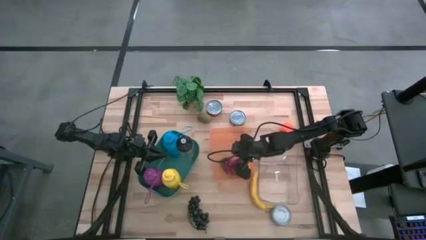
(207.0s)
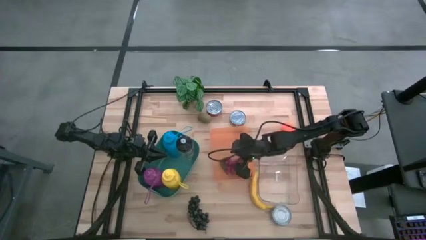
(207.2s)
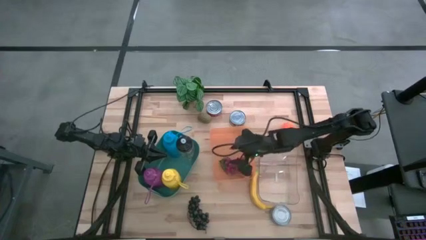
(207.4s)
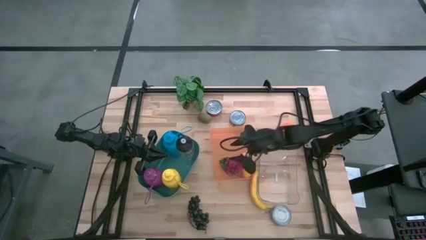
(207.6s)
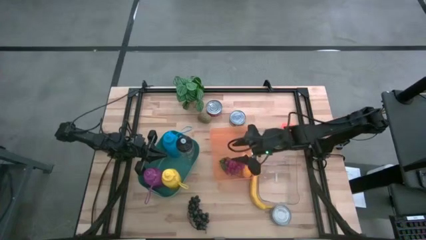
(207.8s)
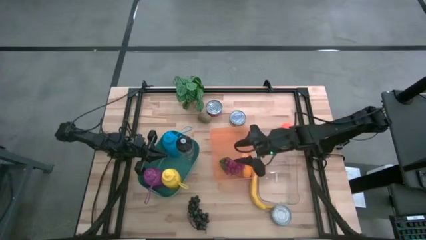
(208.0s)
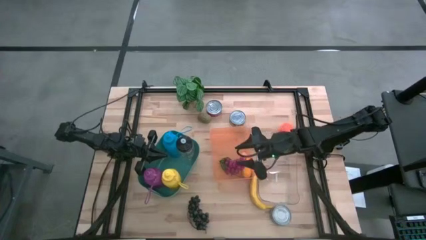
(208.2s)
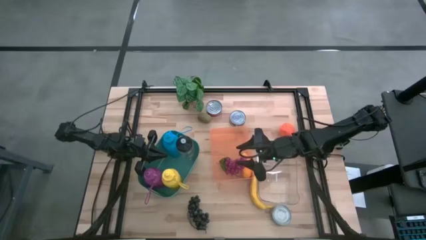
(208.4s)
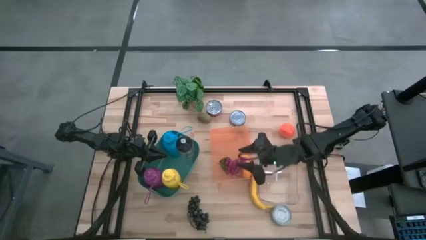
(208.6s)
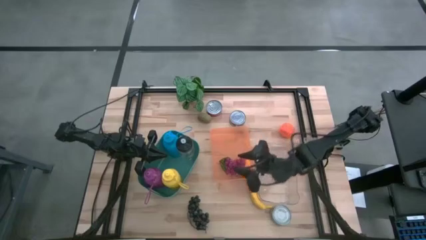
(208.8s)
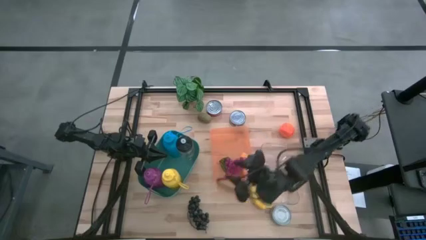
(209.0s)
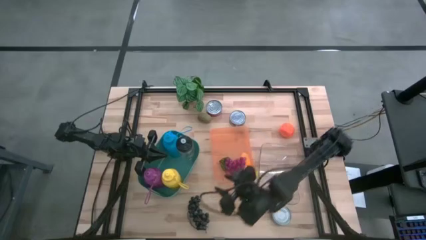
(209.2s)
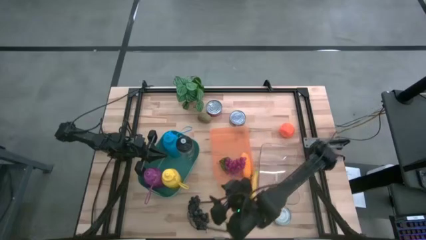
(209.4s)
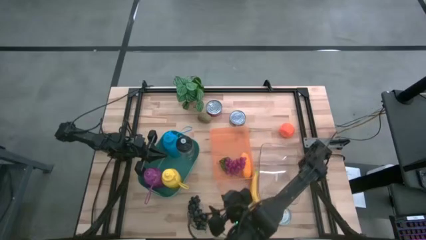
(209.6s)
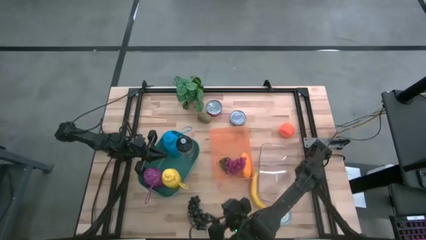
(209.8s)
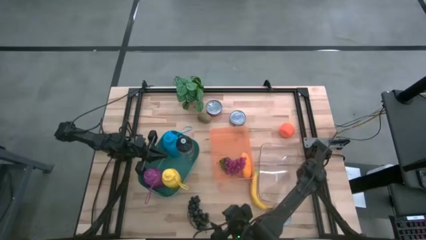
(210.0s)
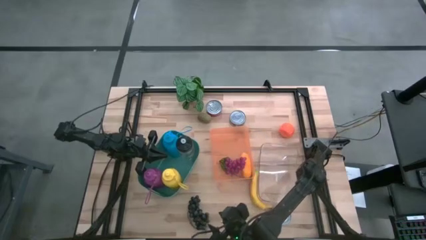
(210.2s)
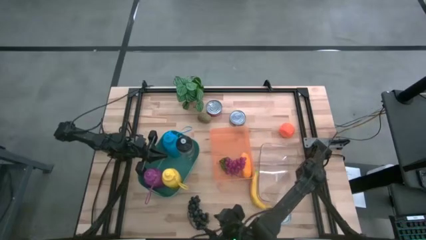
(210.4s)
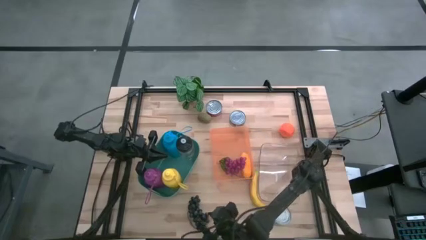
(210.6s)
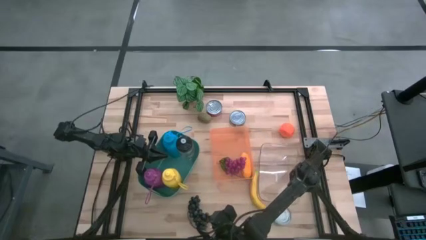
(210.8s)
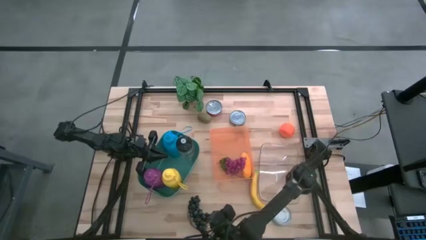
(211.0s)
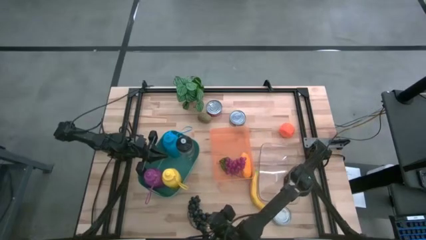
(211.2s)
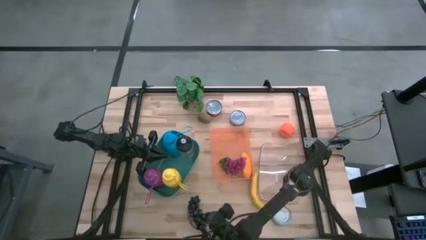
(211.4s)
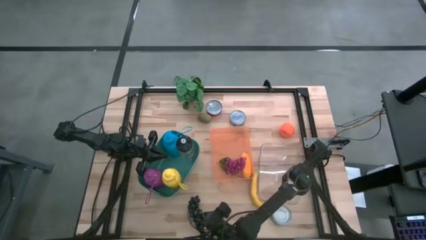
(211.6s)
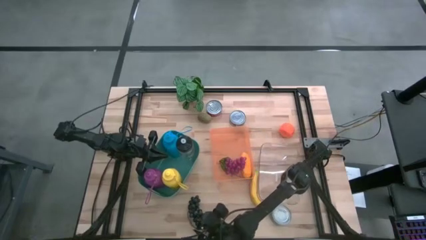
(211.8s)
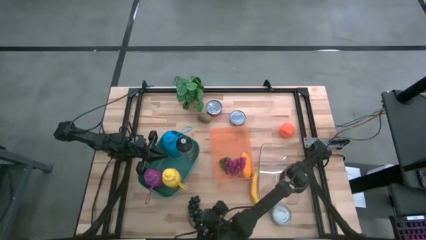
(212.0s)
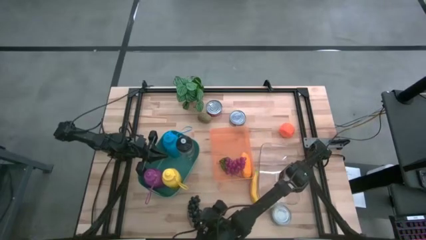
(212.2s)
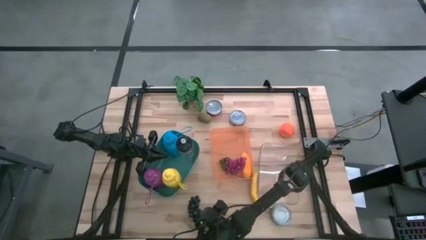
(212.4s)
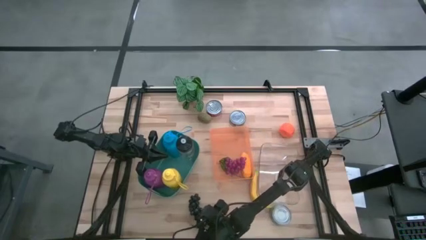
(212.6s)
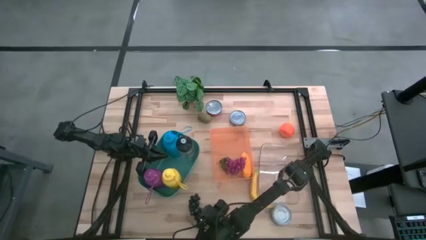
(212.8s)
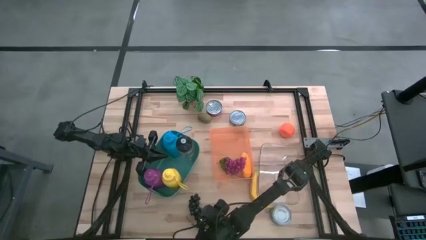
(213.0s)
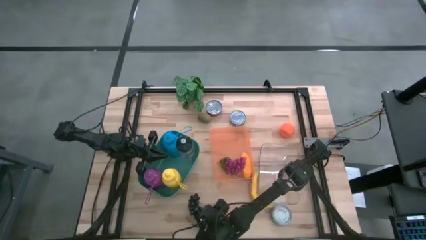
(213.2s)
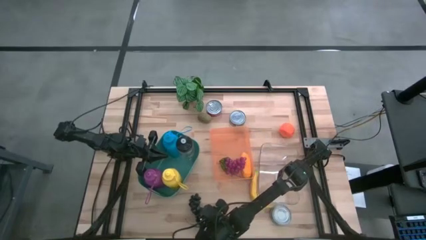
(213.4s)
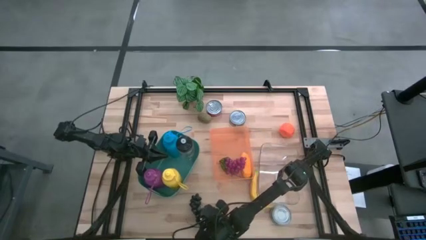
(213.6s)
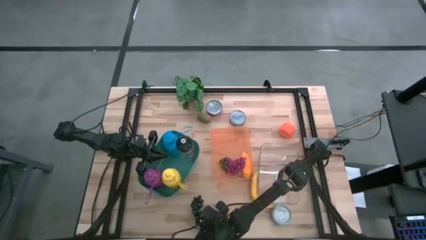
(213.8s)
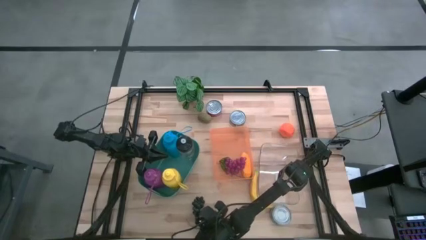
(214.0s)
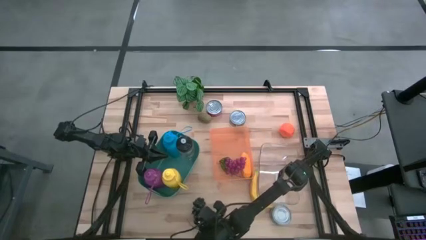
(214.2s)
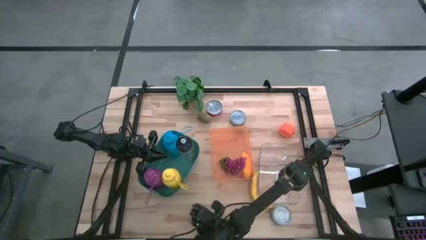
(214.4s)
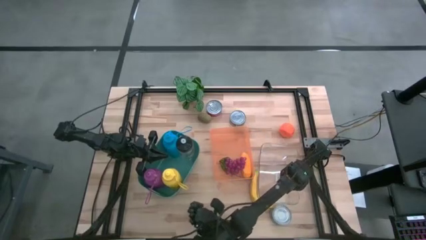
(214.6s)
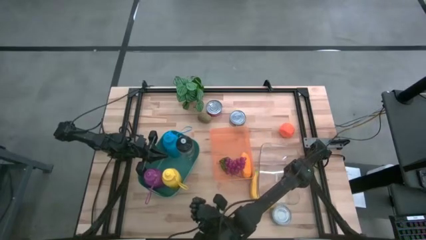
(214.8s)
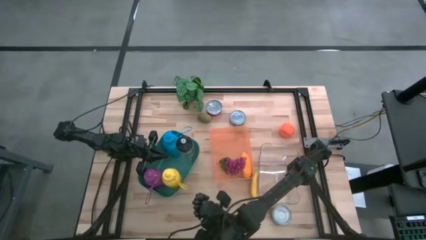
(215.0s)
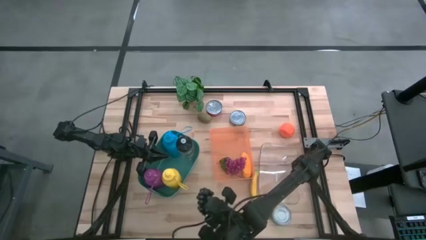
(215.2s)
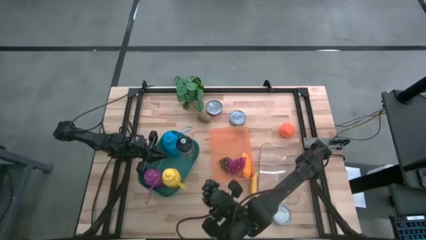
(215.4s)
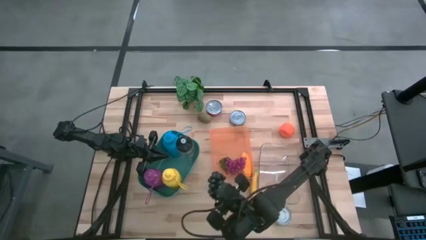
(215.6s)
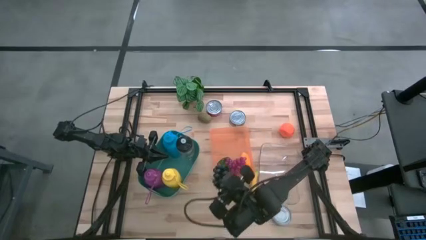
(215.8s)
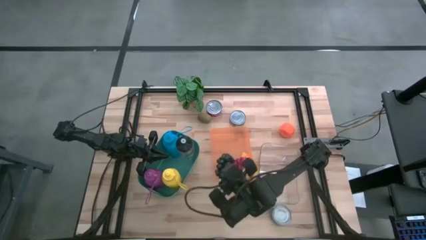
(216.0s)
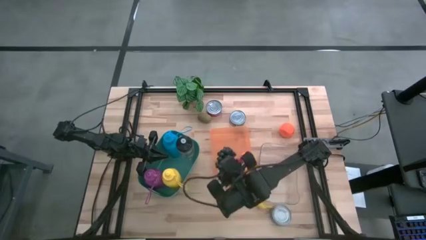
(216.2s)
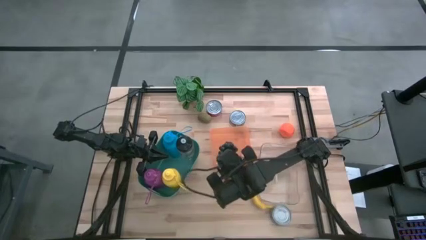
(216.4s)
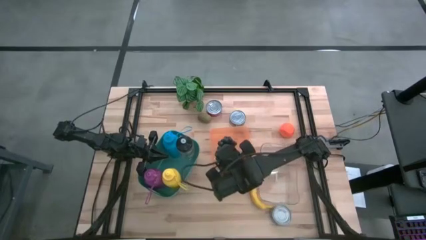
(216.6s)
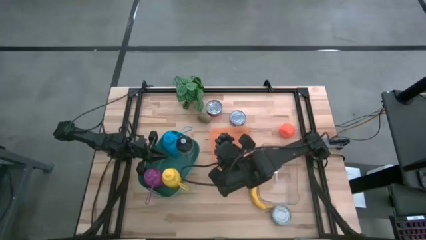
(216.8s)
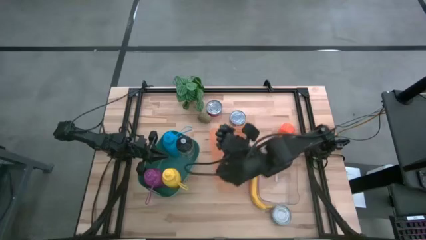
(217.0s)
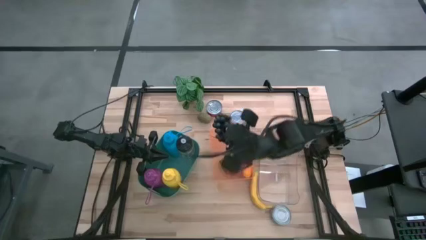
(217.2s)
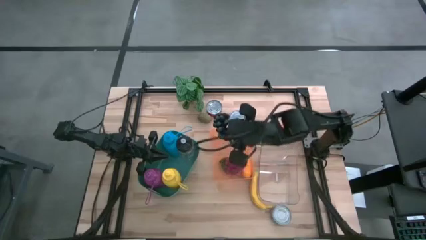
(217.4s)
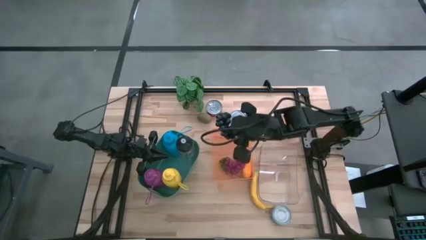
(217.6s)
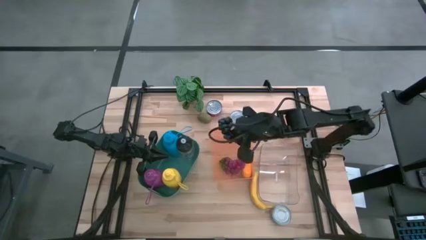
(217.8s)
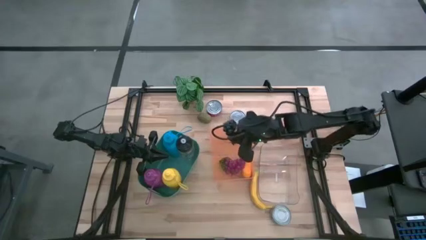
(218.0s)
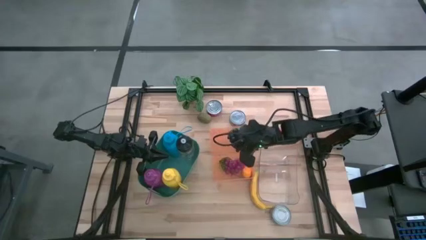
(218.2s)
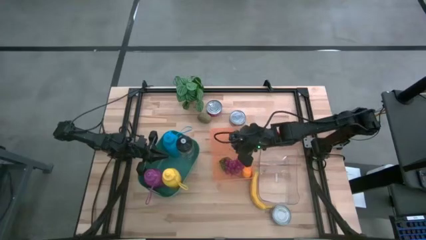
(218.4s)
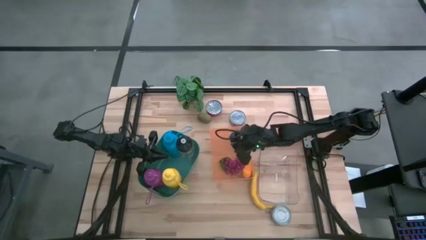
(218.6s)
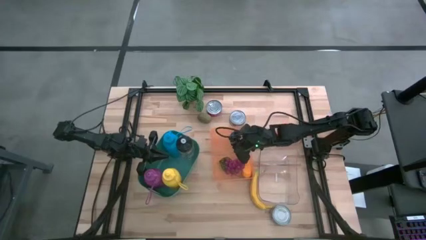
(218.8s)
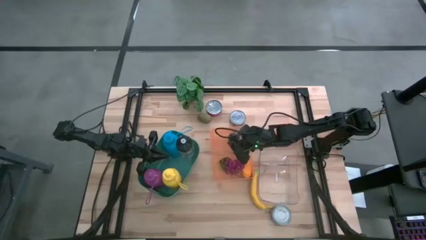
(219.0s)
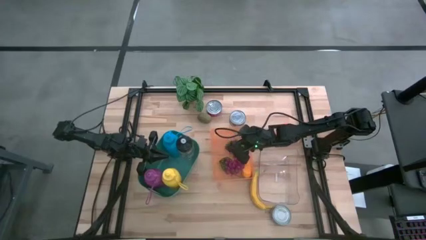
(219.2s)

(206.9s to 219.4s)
Task: Pick & Place Food Item
Put the black grapes into the orange bin

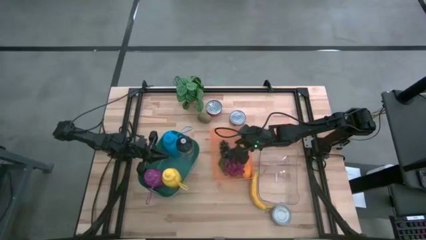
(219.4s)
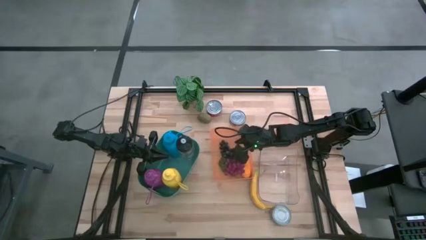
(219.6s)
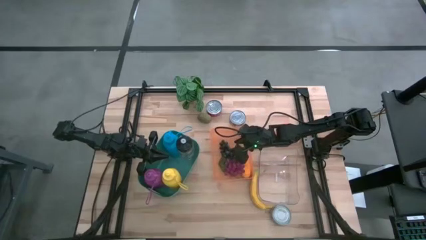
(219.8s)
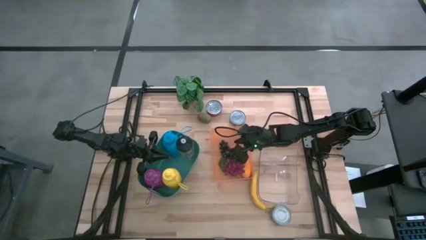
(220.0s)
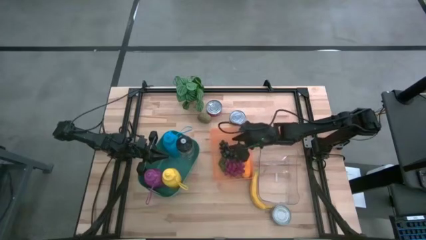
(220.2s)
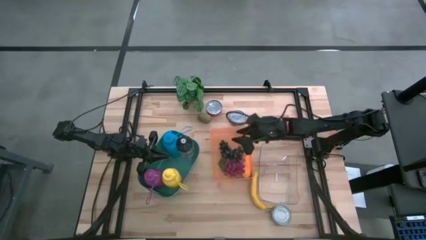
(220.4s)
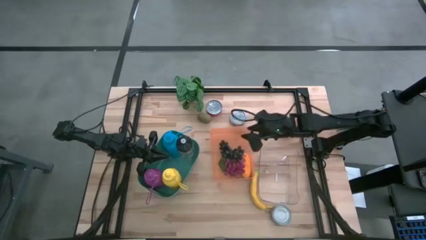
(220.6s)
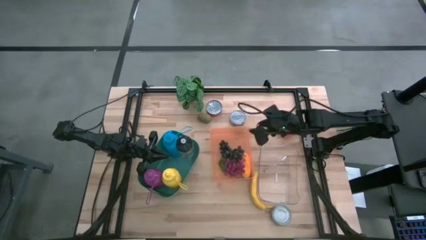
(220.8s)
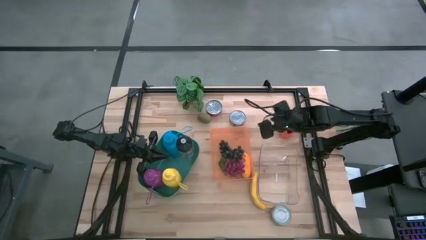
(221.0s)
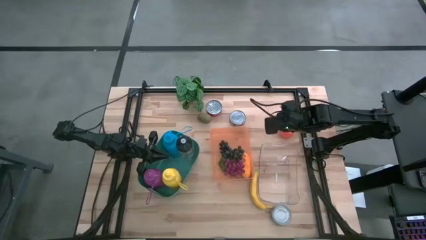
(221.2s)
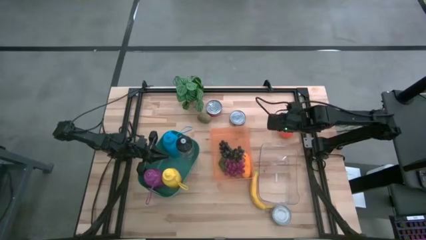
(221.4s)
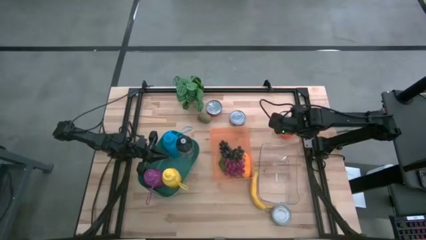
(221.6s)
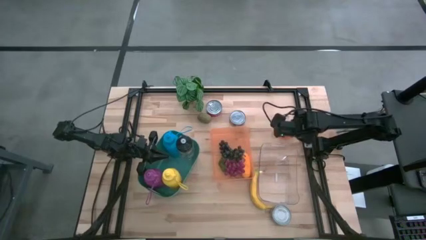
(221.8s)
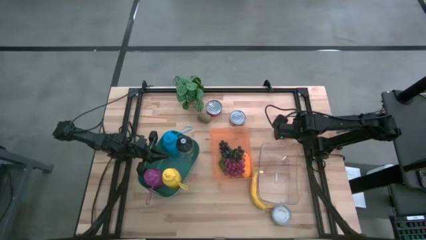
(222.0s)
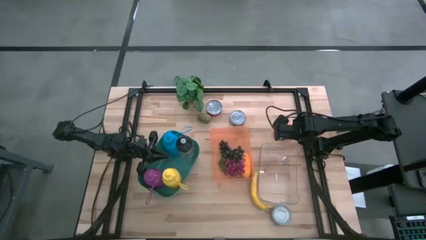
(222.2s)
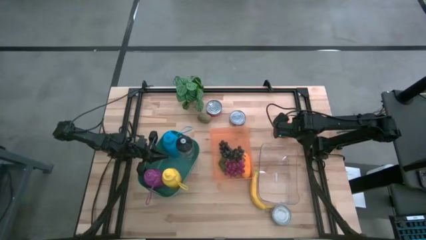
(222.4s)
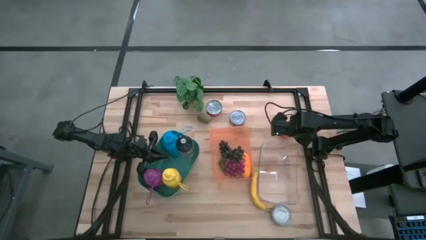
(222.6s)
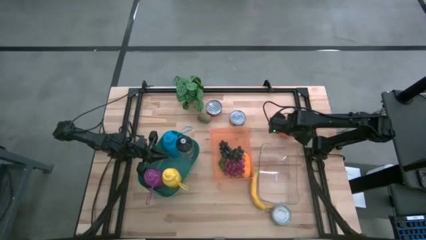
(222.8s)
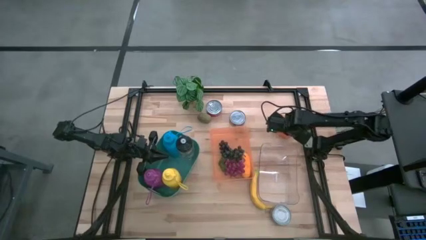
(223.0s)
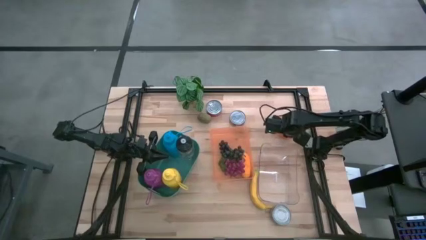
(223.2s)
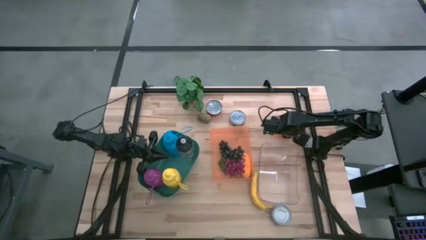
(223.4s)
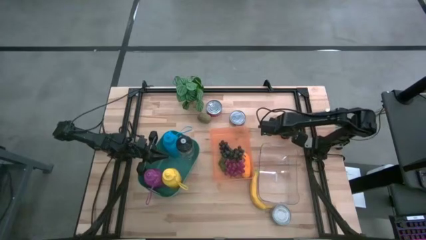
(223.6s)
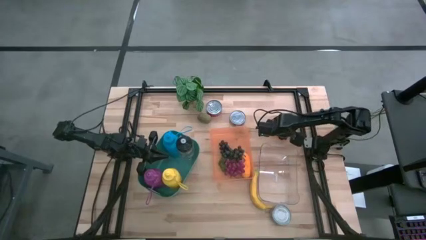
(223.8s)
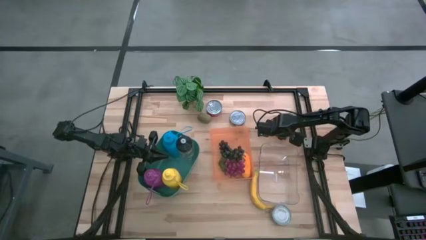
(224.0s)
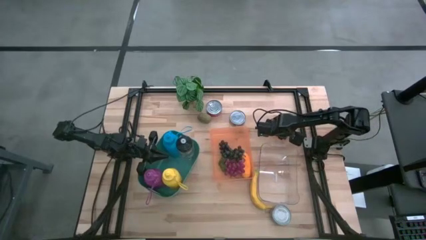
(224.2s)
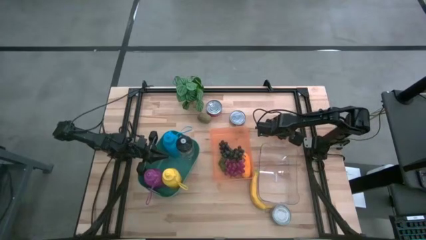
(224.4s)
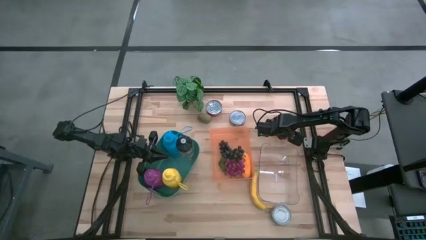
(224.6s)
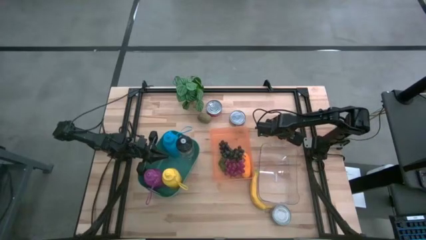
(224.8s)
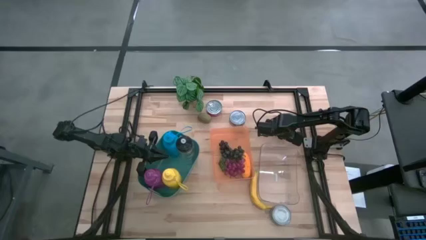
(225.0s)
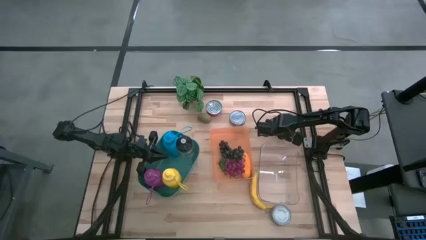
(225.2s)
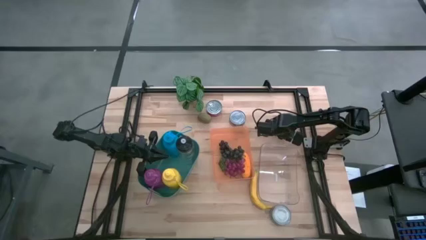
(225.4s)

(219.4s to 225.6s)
Put the orange into the orange bin
